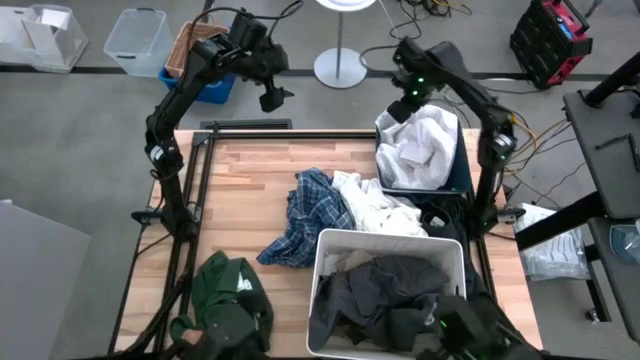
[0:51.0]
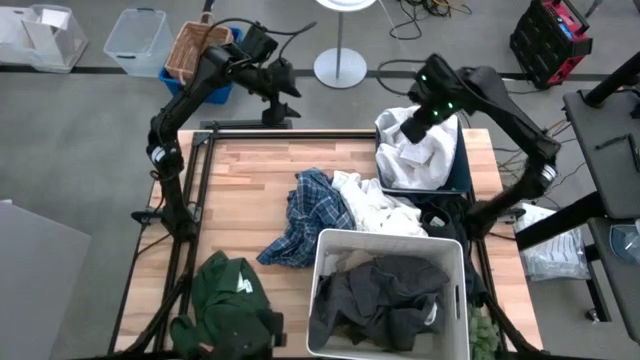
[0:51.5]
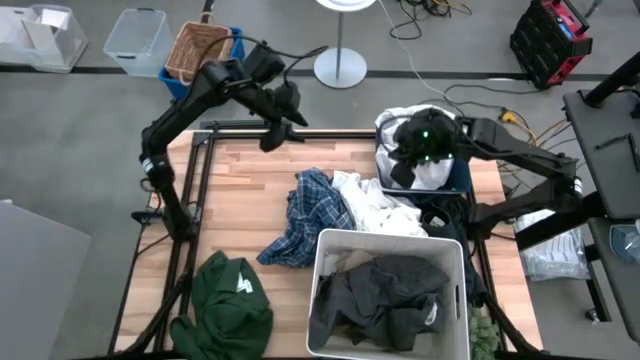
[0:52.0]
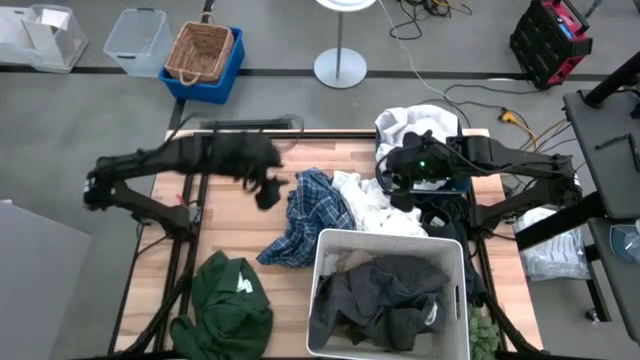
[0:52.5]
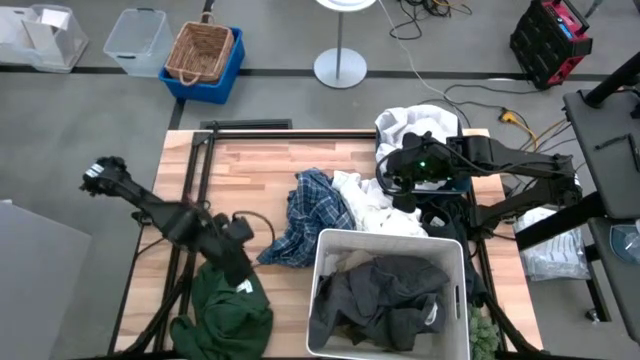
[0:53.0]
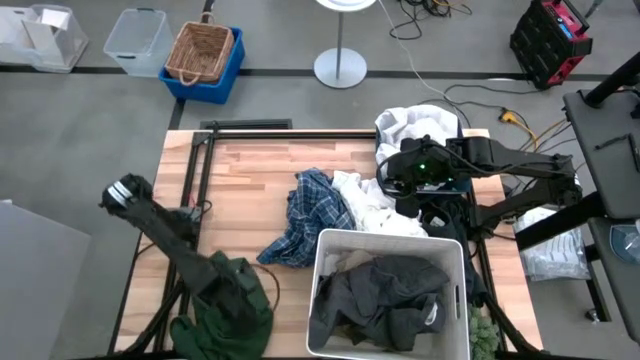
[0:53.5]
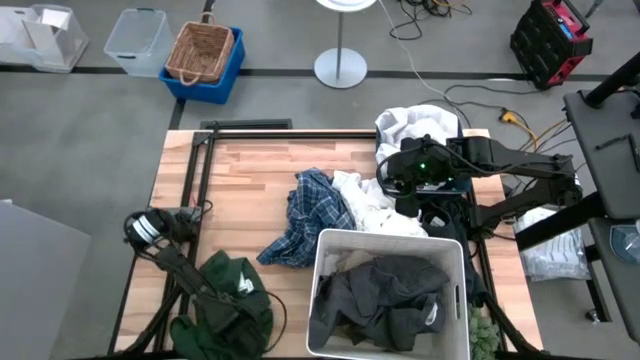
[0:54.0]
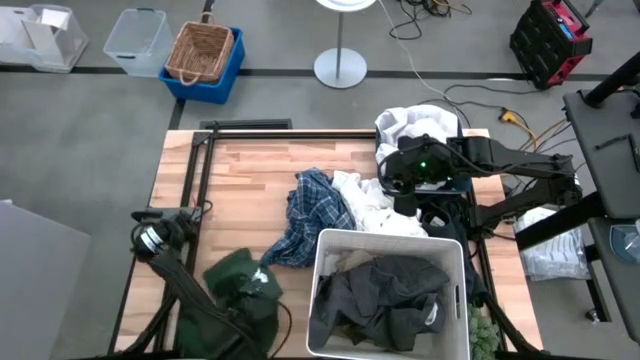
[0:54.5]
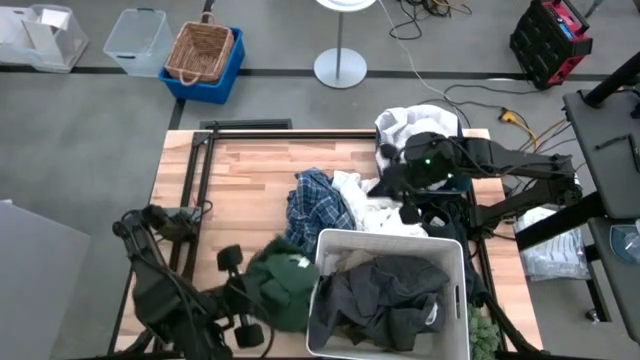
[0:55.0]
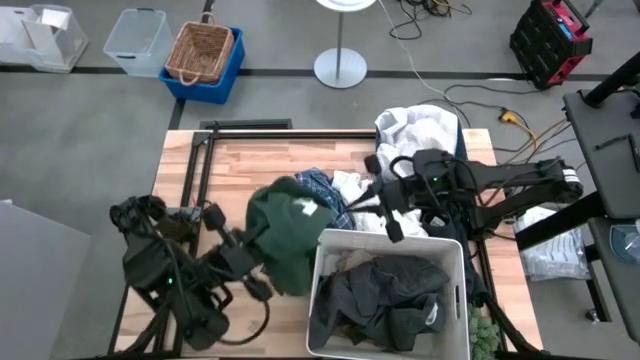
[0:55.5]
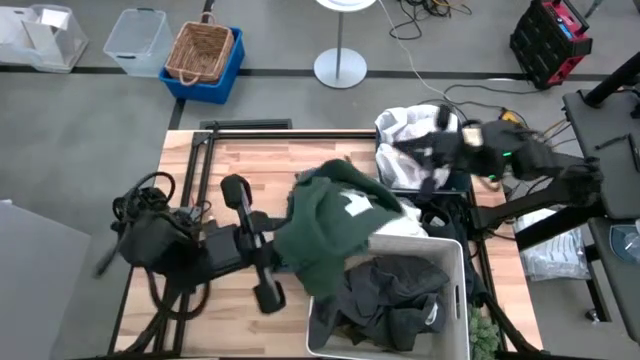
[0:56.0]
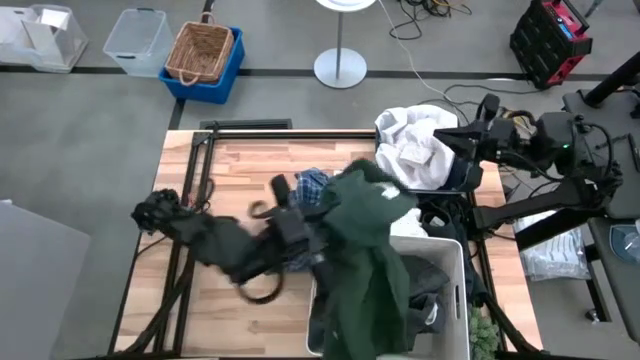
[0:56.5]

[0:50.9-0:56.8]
Task: Sort clothes
Put the green polo shirt into the white bin

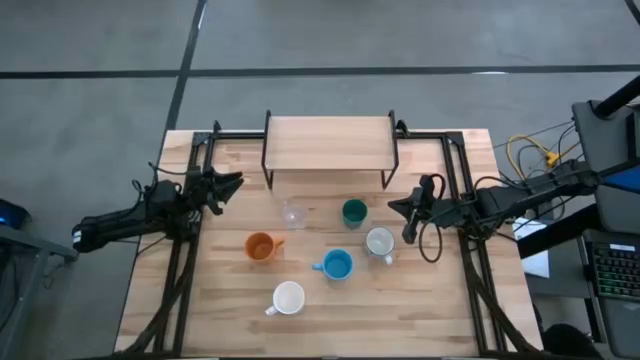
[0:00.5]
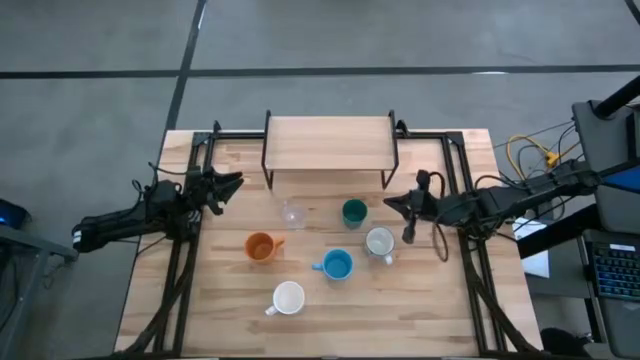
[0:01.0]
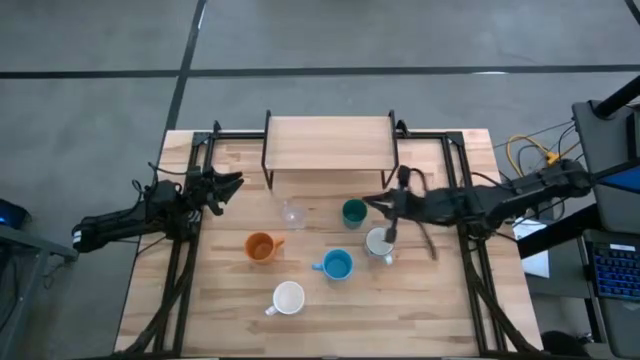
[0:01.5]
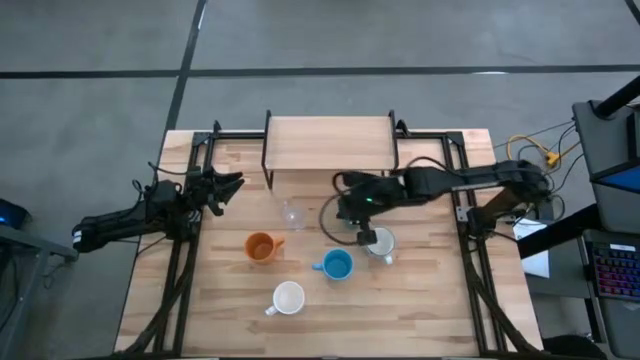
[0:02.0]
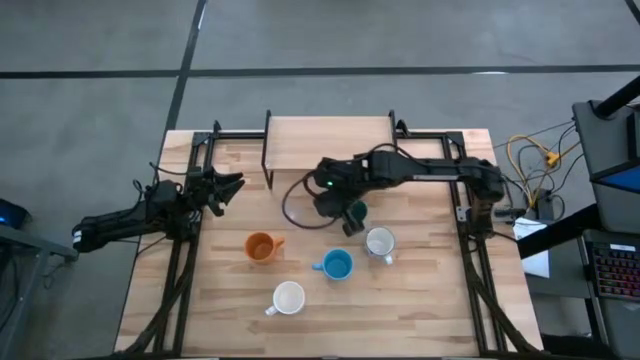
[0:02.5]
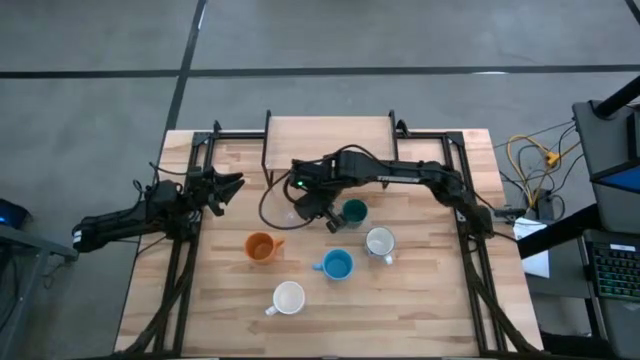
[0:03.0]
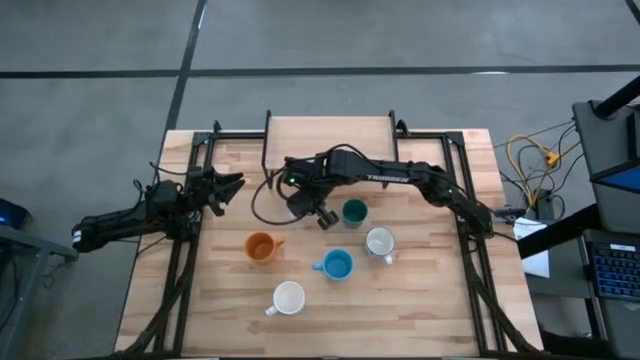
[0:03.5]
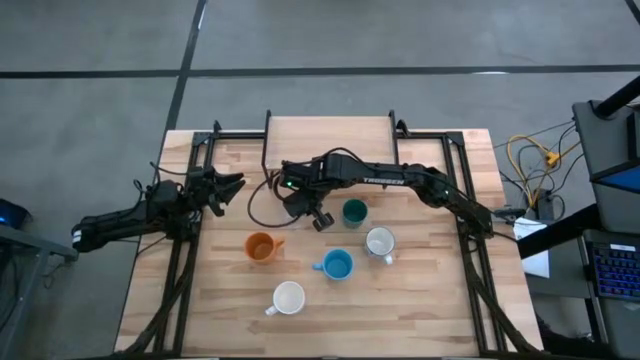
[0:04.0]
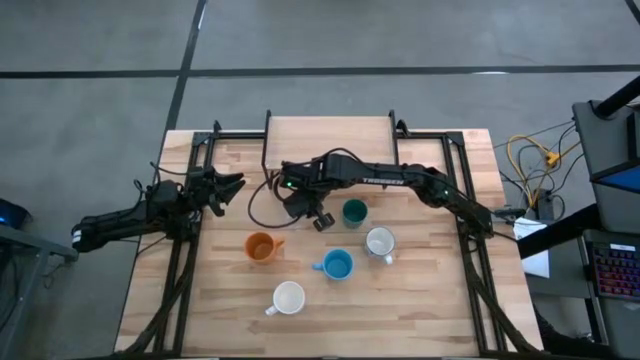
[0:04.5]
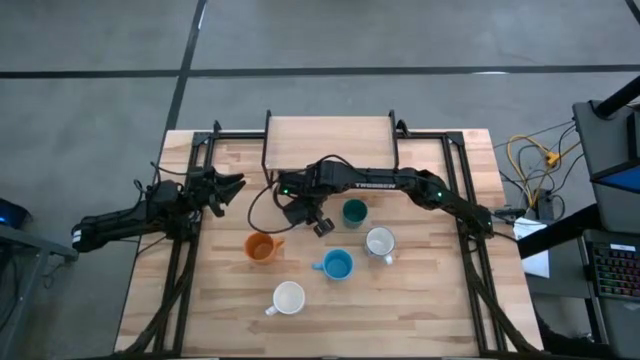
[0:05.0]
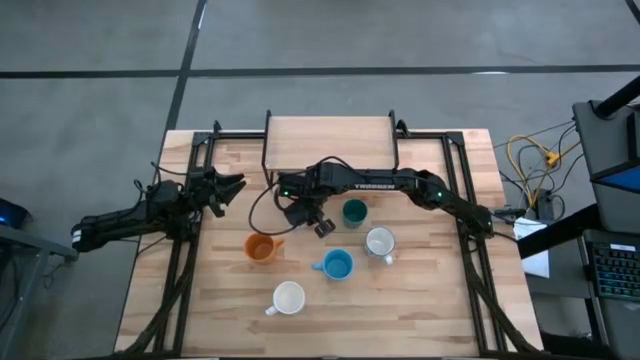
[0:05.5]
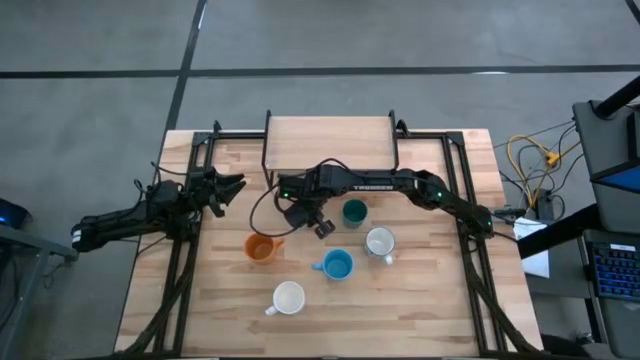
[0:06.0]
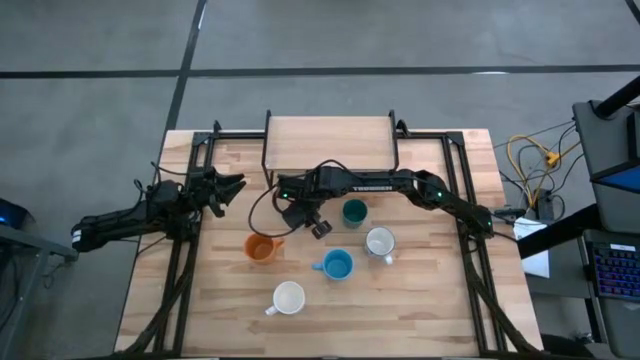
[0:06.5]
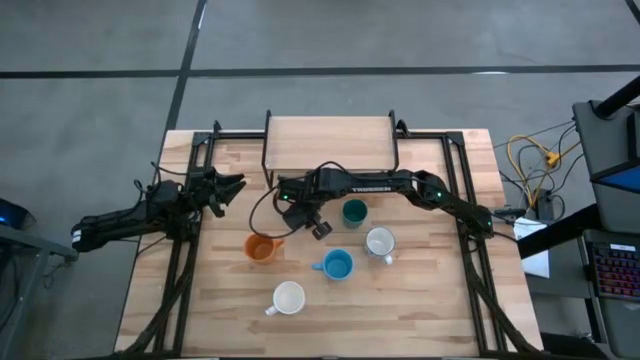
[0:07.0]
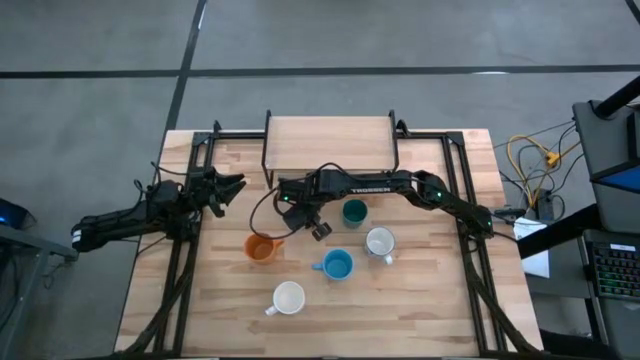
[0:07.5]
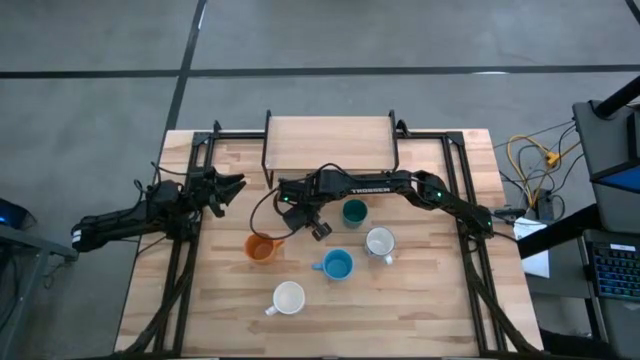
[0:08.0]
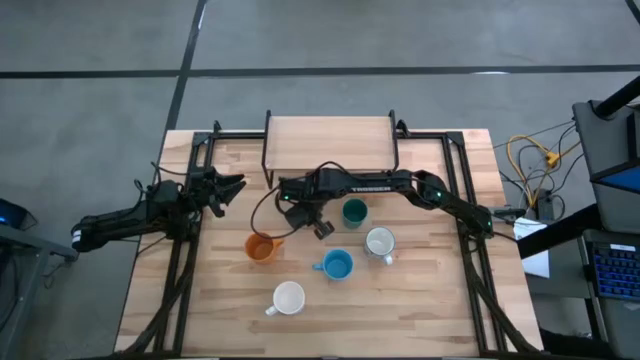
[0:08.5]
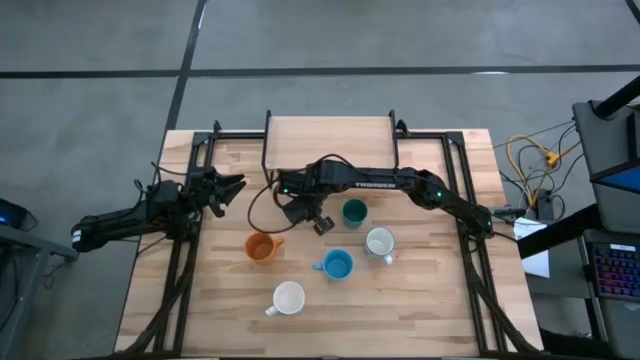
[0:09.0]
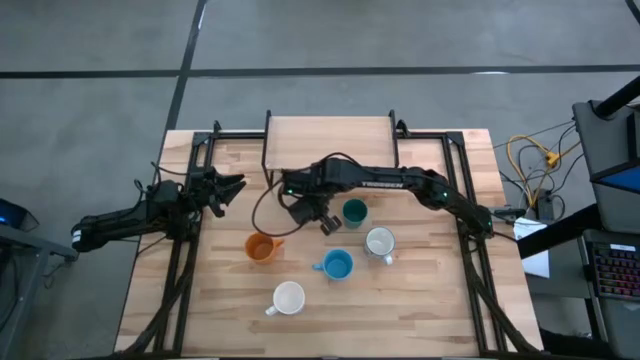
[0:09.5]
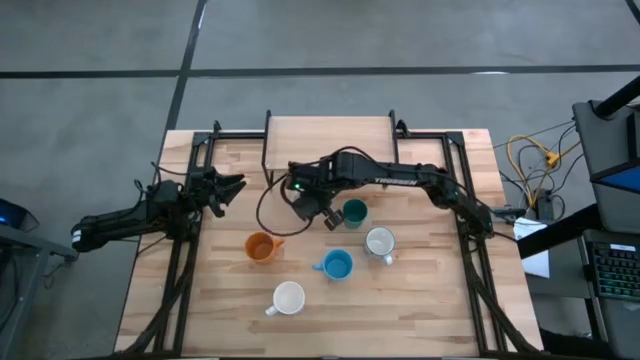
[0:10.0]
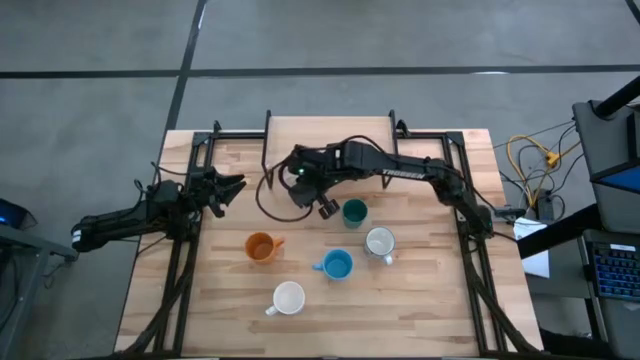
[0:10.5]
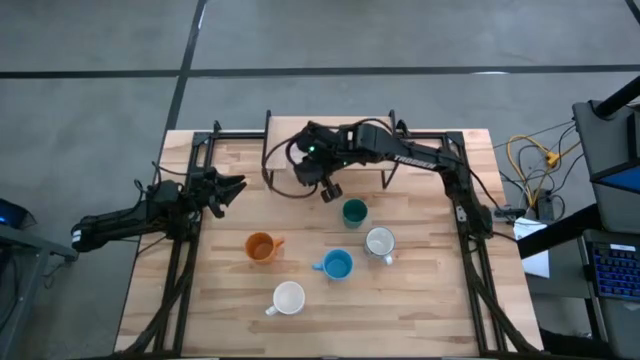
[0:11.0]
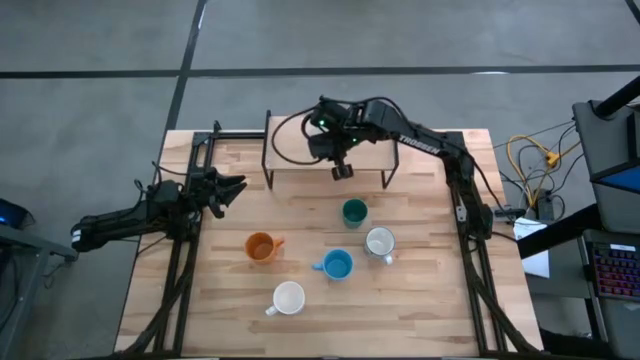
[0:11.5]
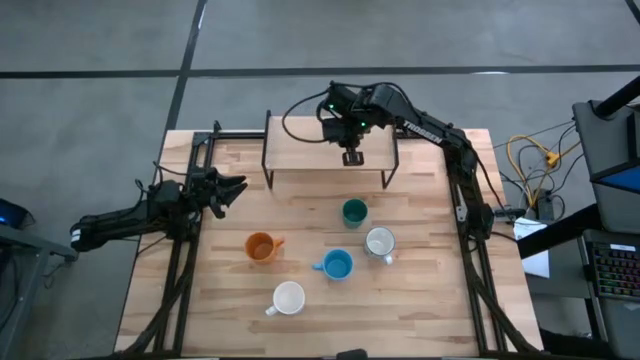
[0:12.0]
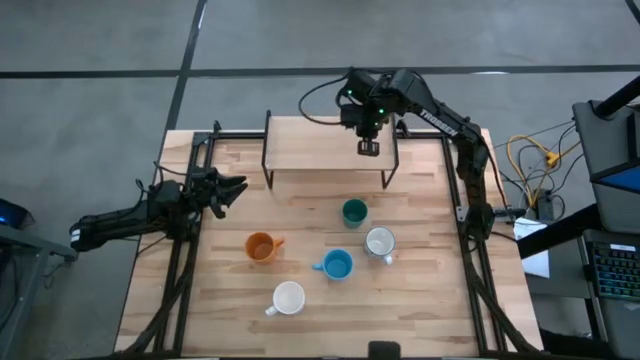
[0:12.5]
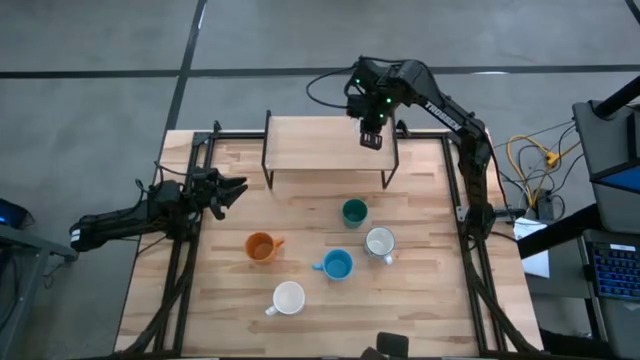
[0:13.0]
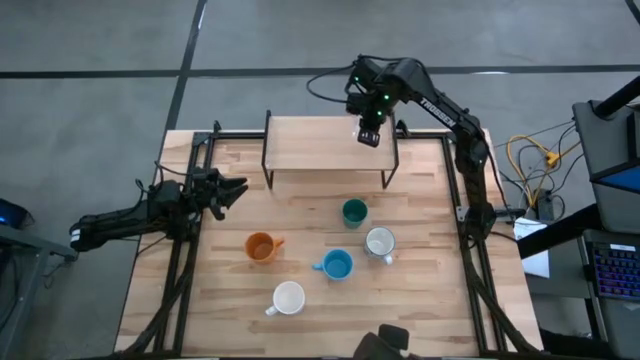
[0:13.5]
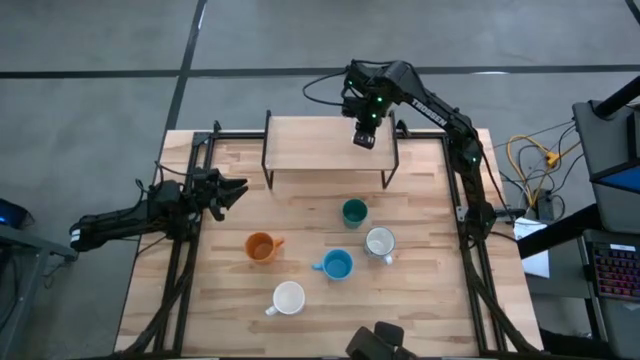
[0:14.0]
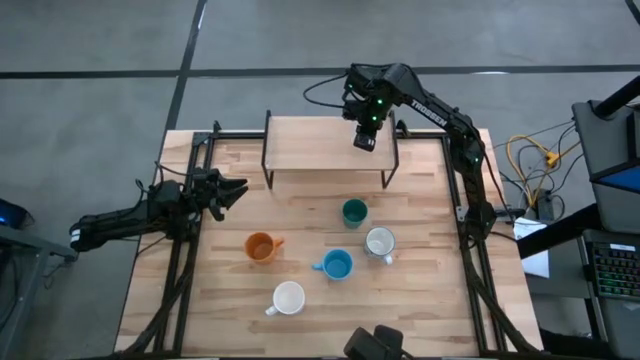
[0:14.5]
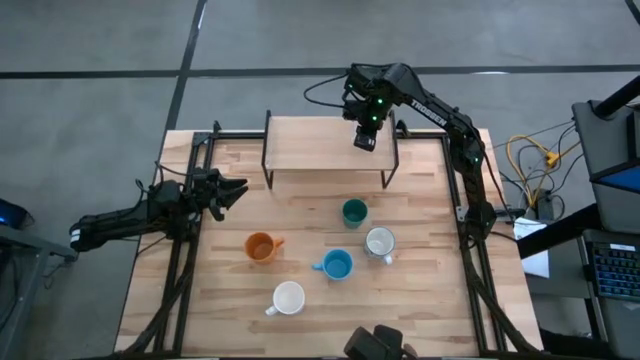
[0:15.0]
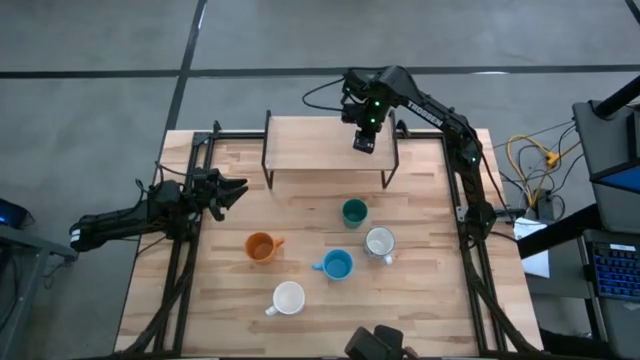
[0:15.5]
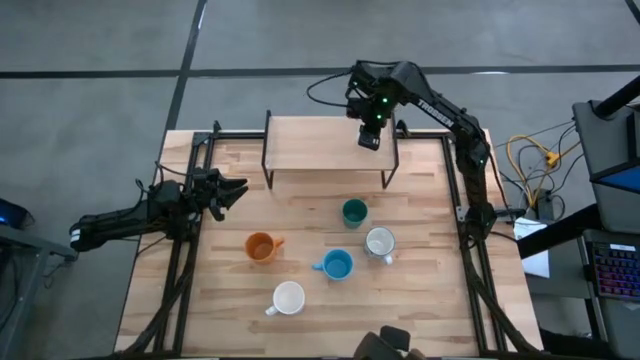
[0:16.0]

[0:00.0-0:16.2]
Task: Stack small to large cups/mugs on shelf
Put the transparent mug on the shelf
